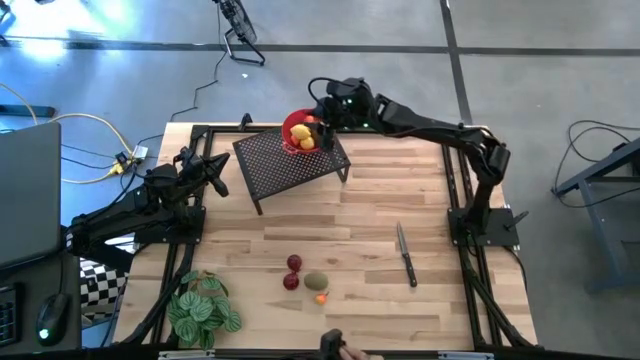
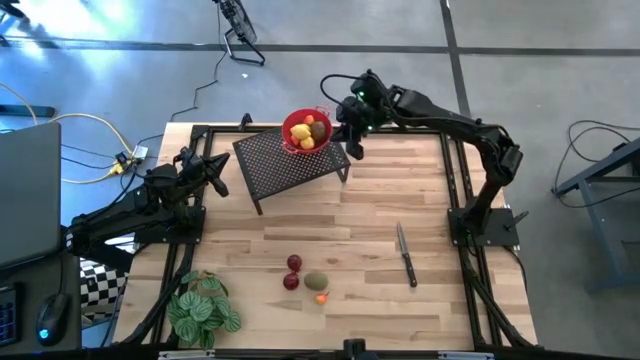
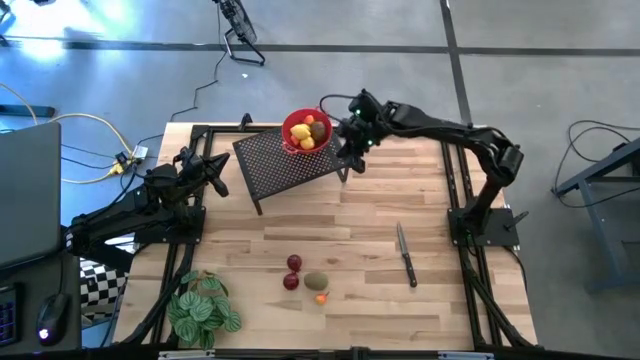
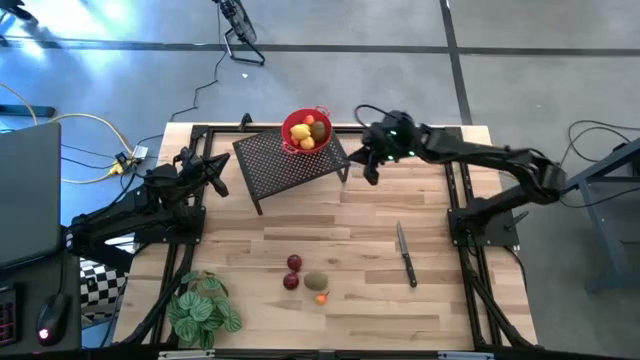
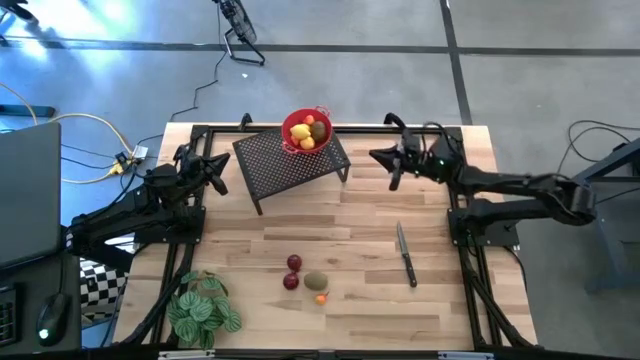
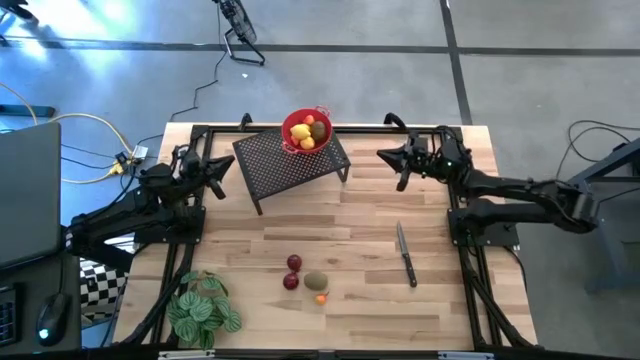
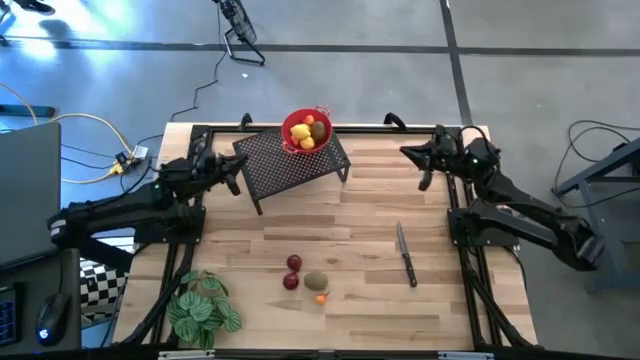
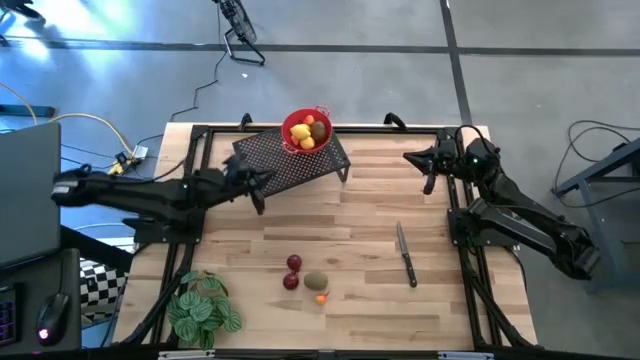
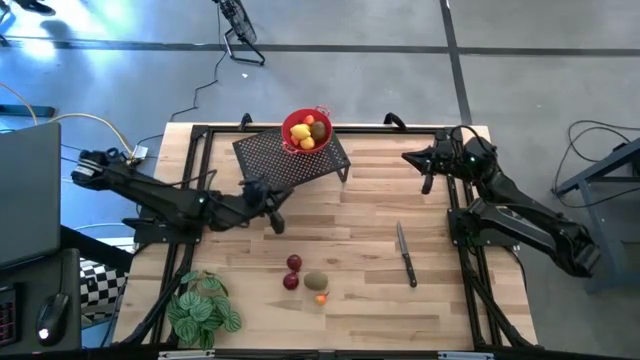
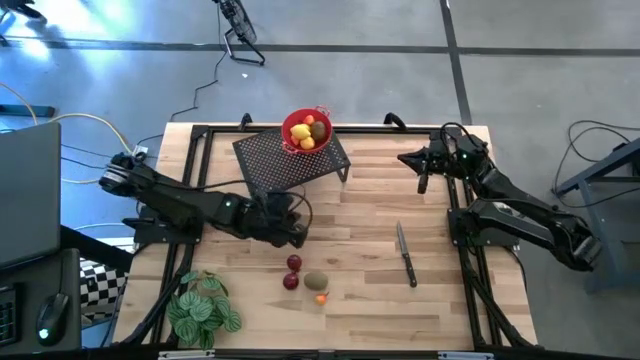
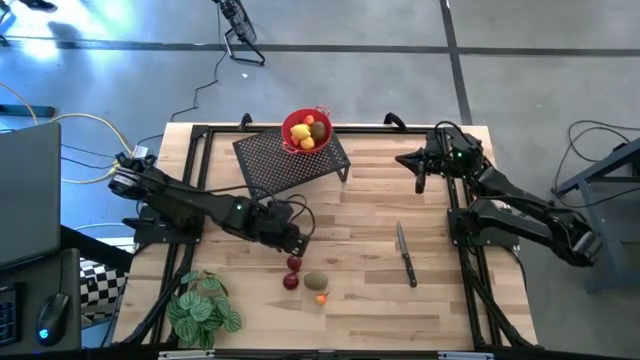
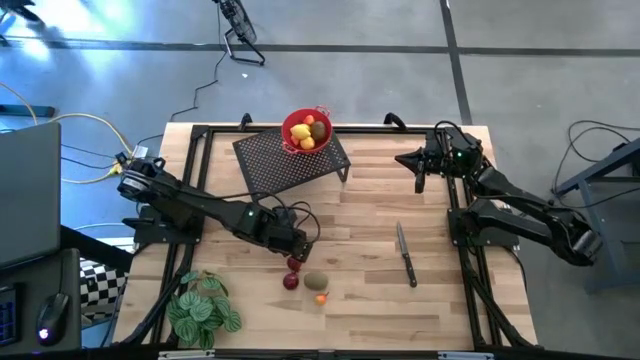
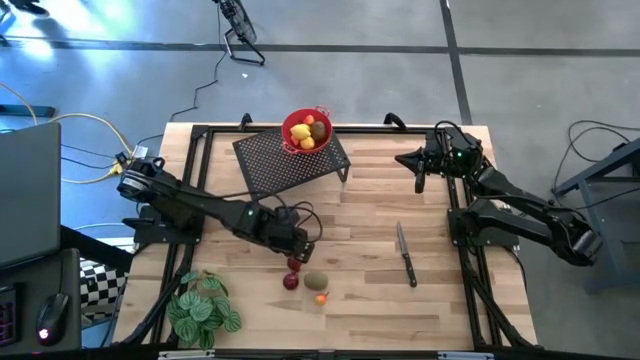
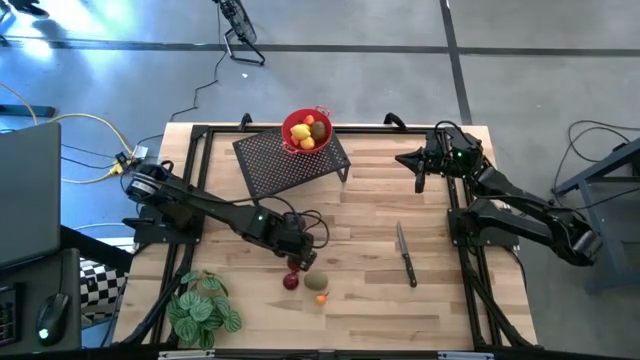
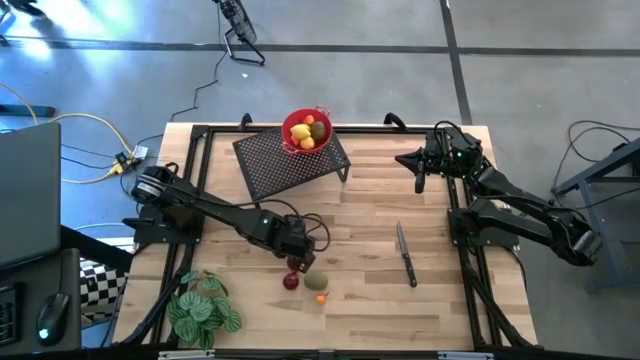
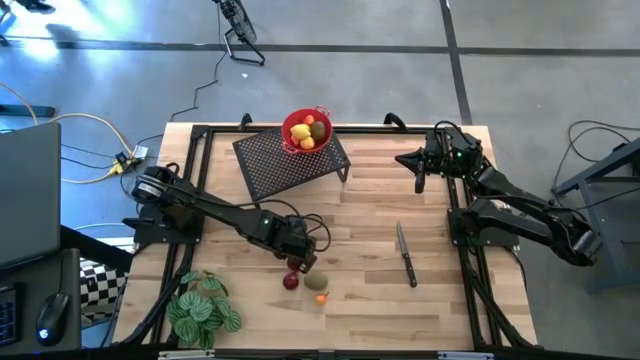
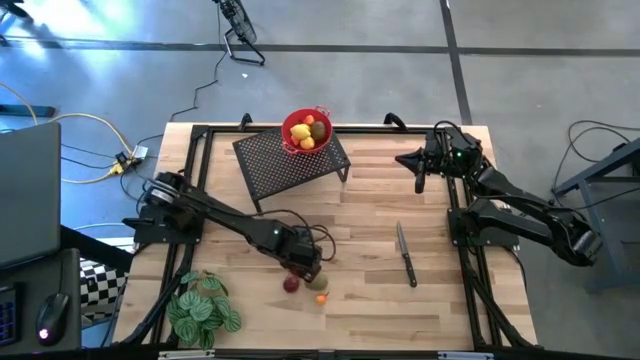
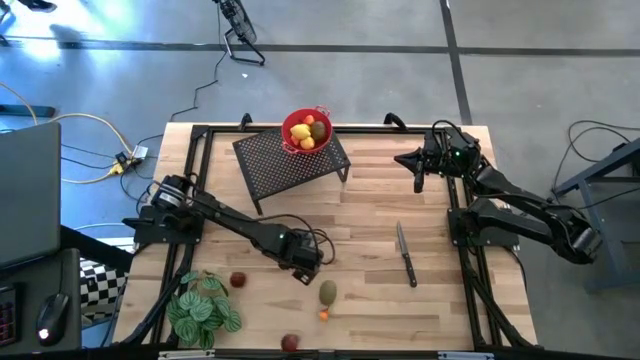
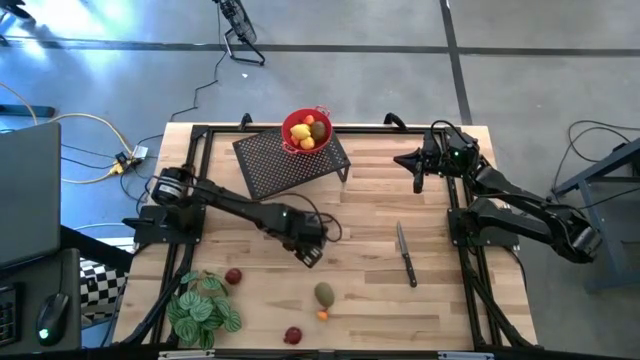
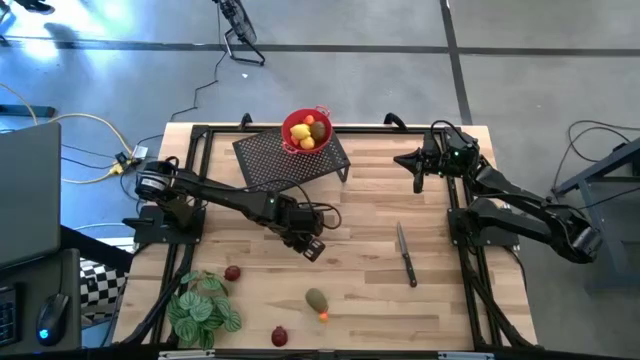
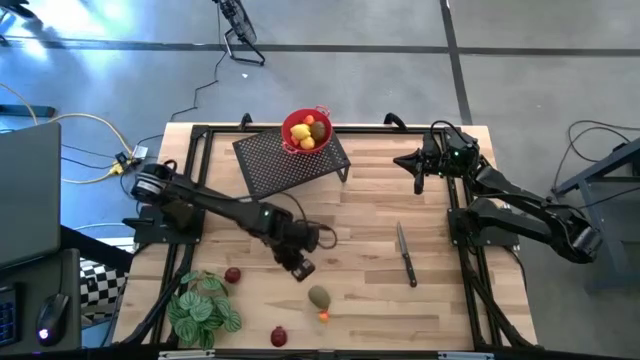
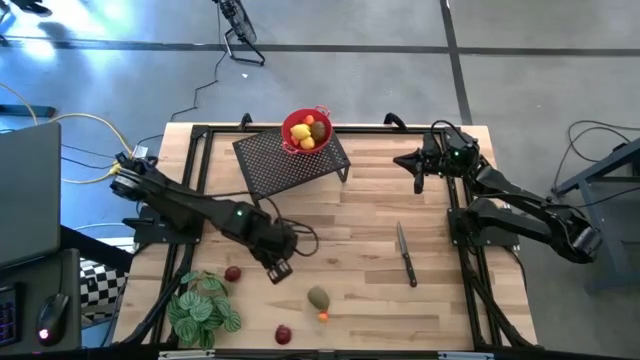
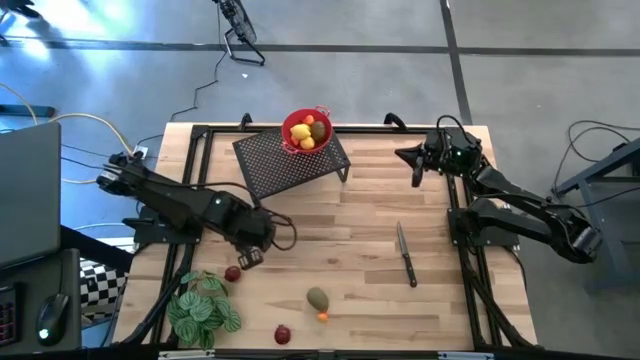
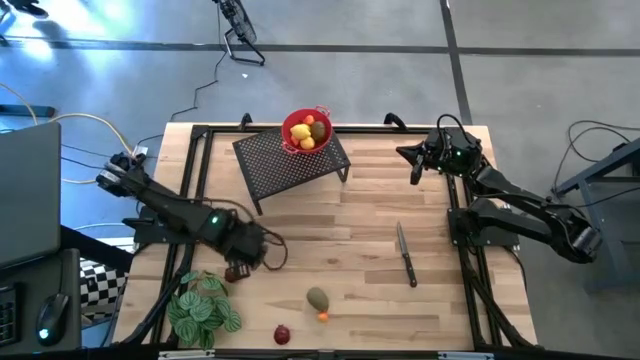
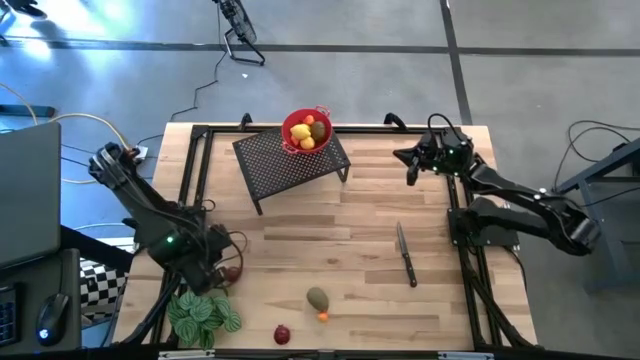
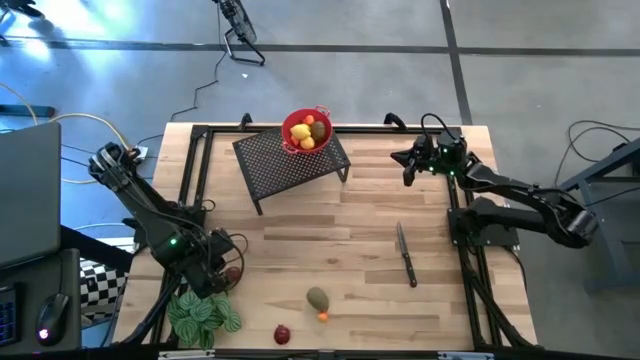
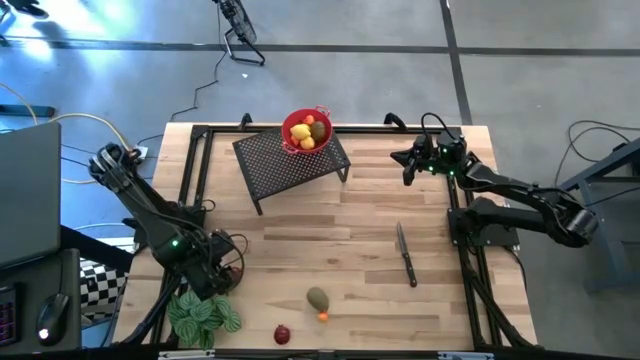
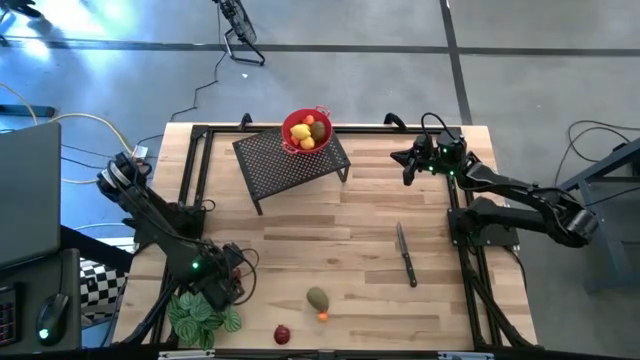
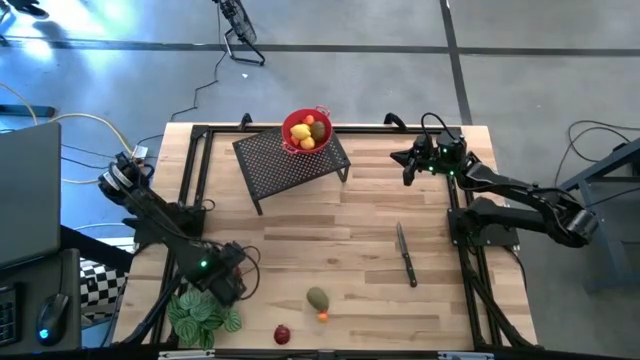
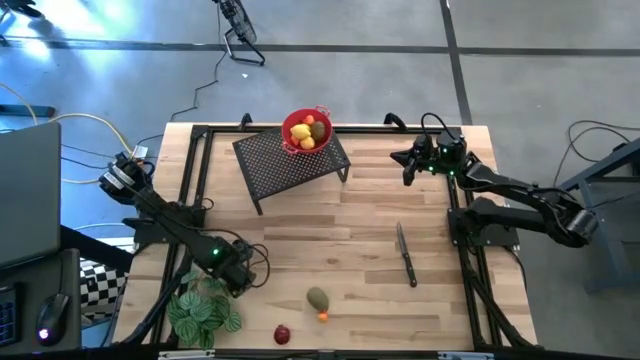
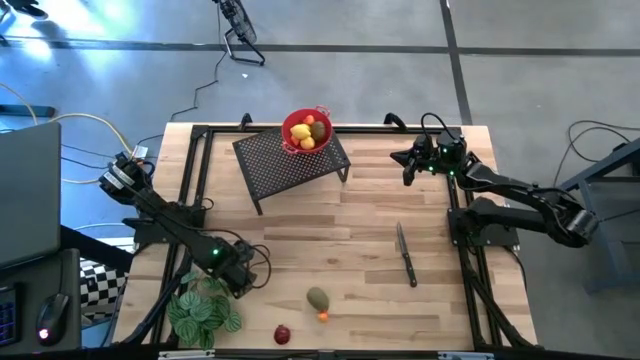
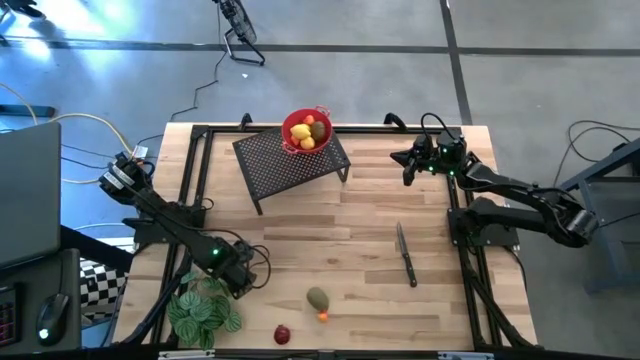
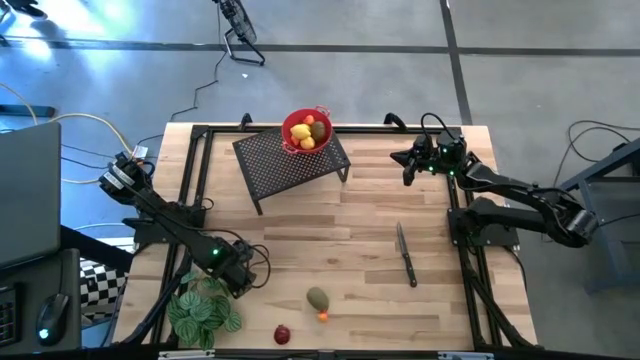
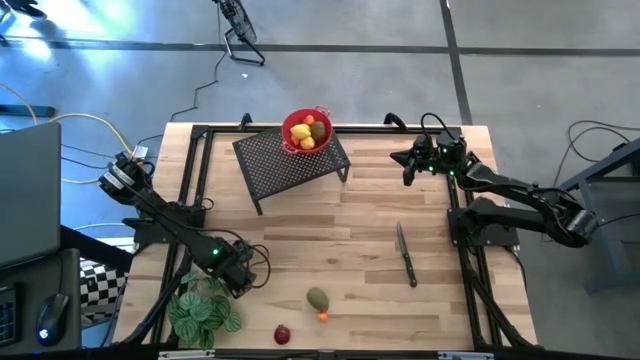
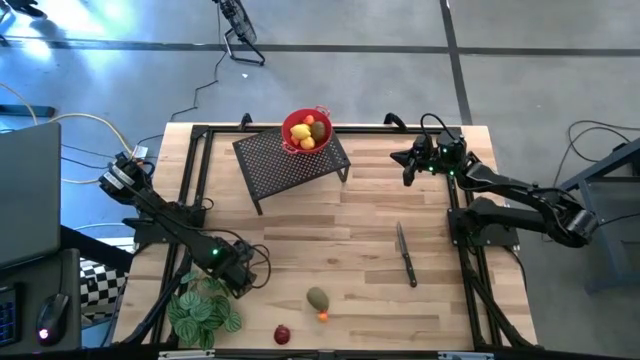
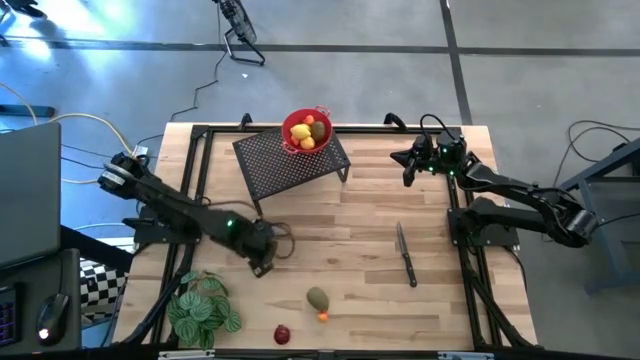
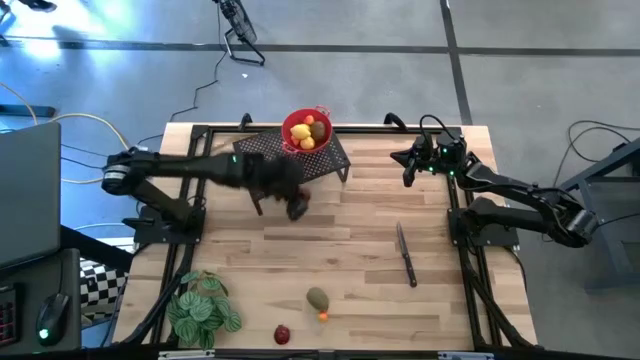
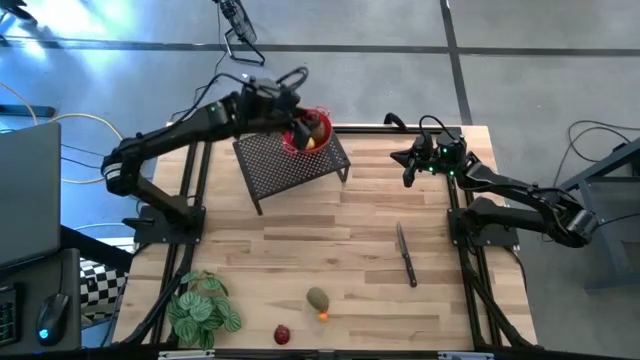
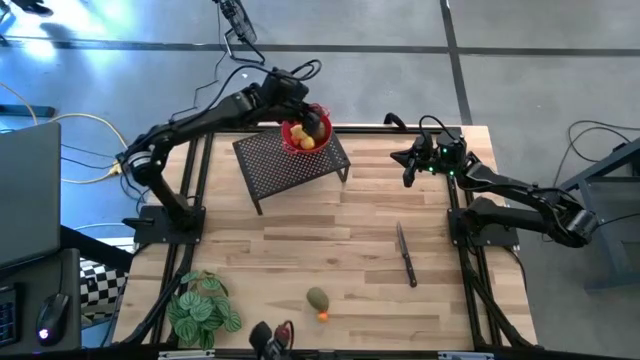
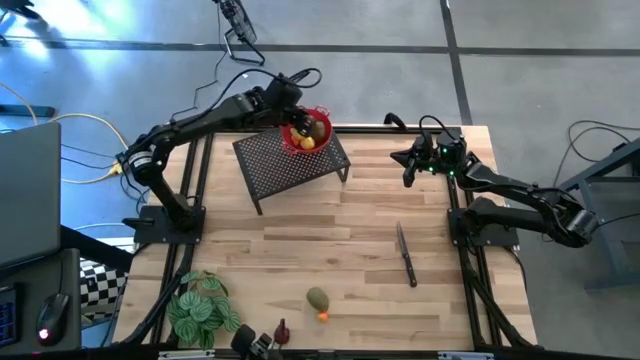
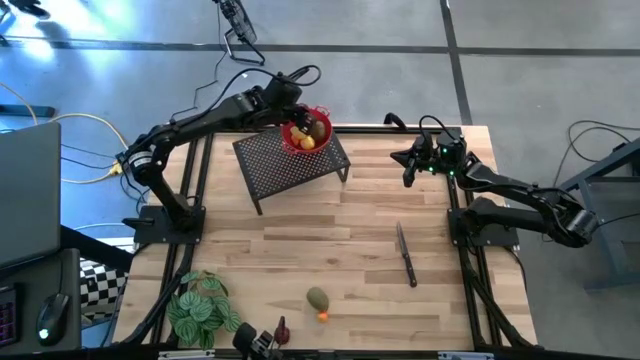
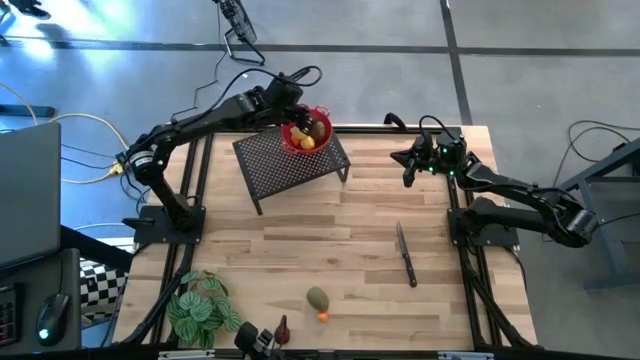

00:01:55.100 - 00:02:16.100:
Task: Pick & Place Fruit
Put the top pomegranate into the red strainer bowl on the shelf
